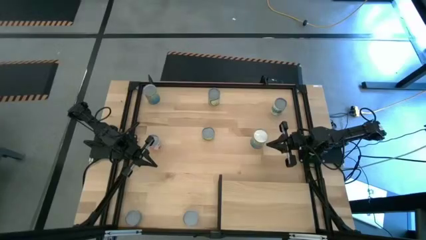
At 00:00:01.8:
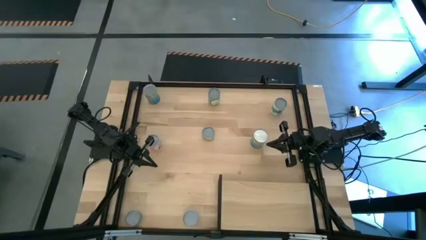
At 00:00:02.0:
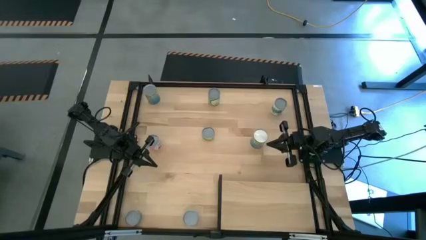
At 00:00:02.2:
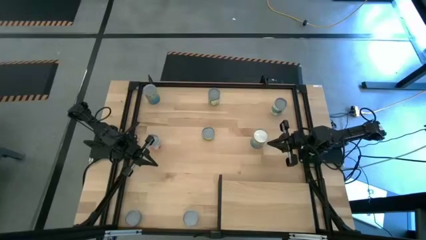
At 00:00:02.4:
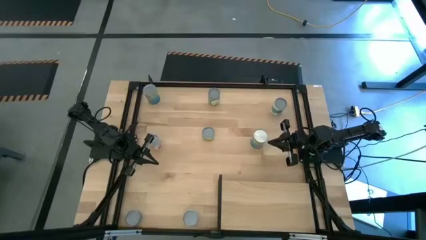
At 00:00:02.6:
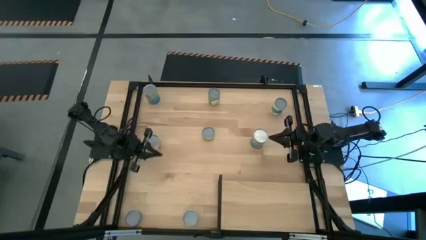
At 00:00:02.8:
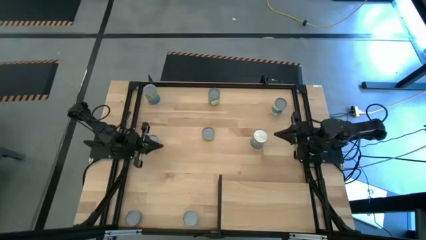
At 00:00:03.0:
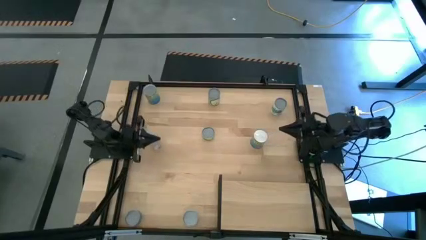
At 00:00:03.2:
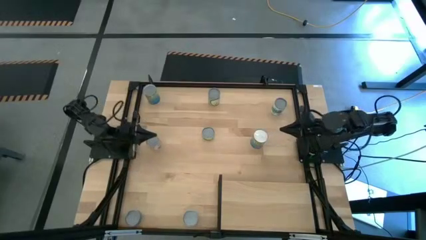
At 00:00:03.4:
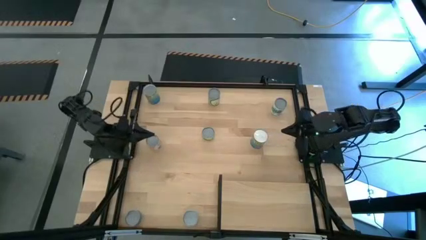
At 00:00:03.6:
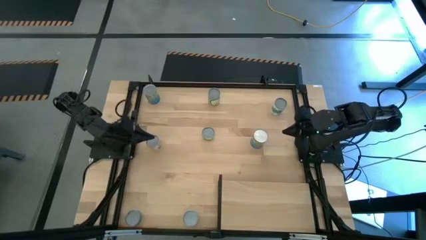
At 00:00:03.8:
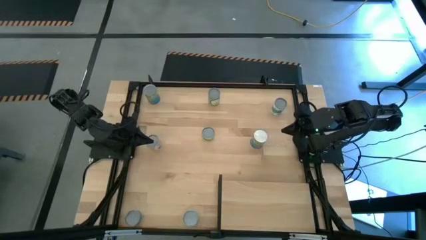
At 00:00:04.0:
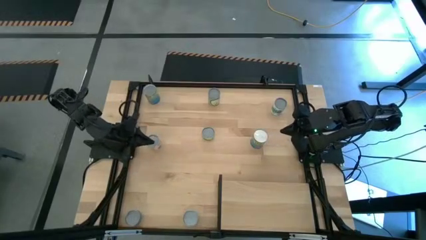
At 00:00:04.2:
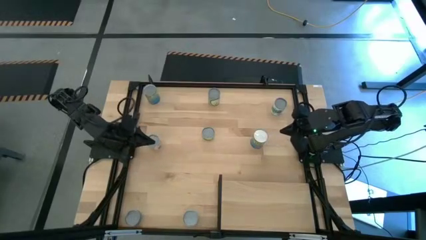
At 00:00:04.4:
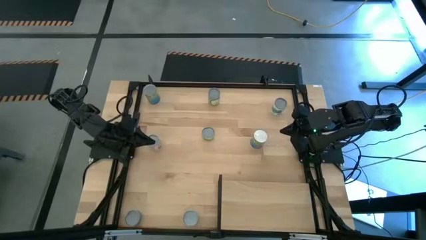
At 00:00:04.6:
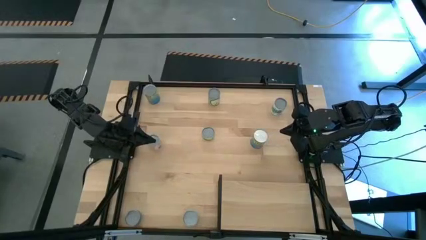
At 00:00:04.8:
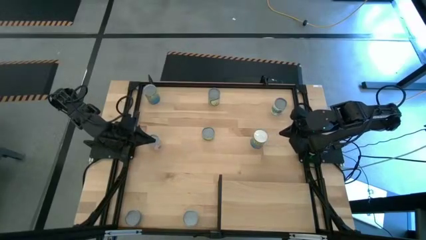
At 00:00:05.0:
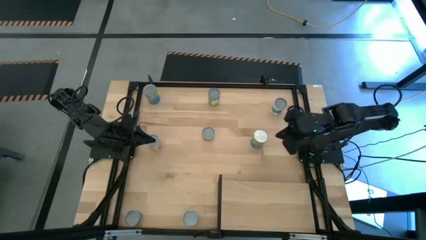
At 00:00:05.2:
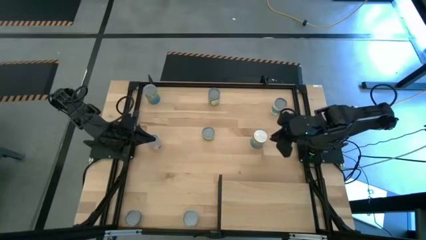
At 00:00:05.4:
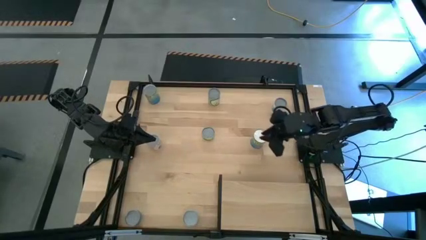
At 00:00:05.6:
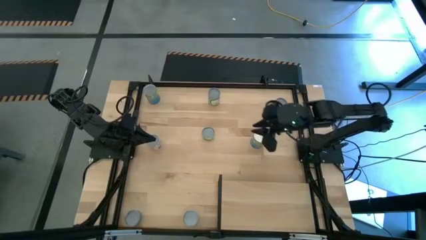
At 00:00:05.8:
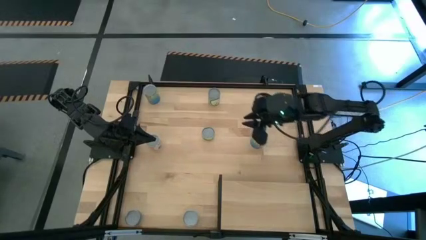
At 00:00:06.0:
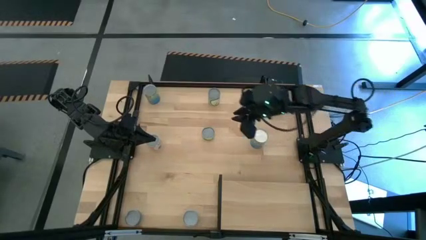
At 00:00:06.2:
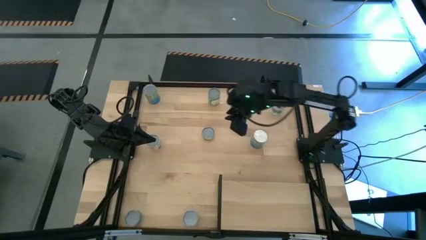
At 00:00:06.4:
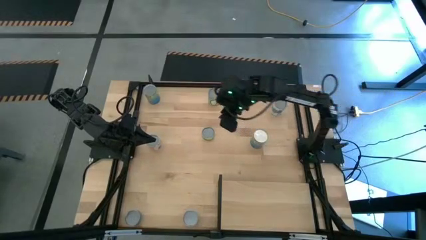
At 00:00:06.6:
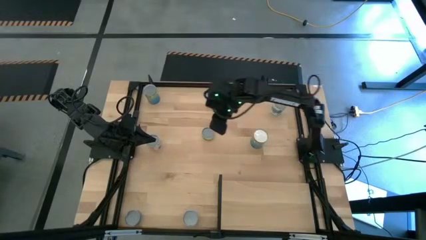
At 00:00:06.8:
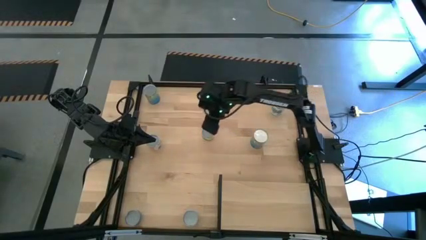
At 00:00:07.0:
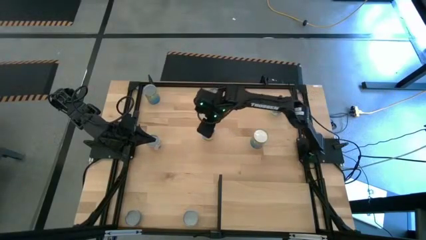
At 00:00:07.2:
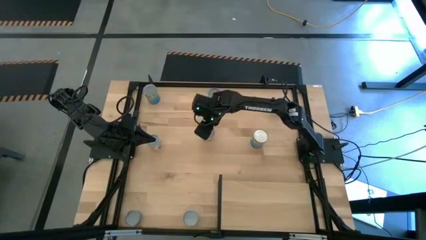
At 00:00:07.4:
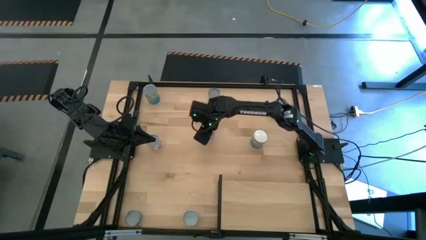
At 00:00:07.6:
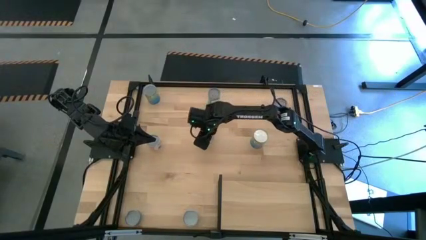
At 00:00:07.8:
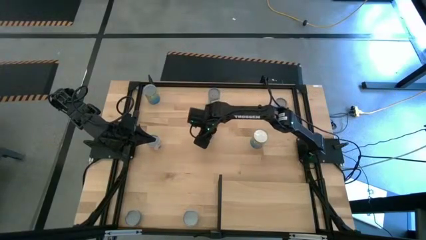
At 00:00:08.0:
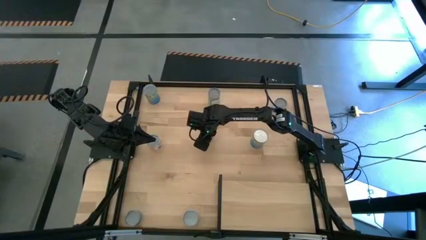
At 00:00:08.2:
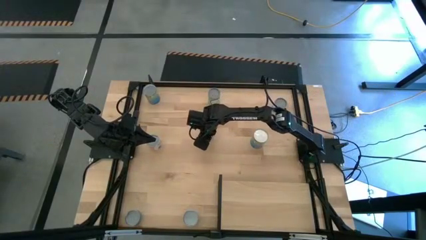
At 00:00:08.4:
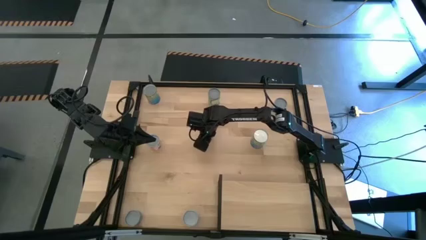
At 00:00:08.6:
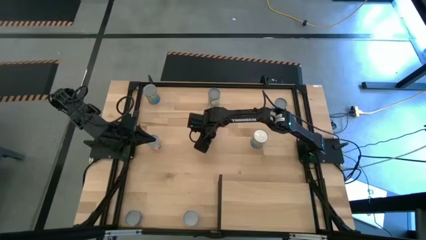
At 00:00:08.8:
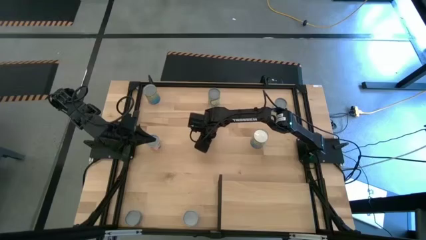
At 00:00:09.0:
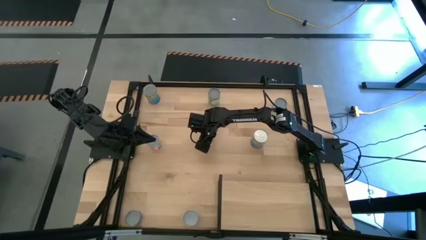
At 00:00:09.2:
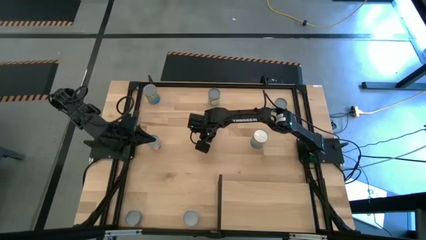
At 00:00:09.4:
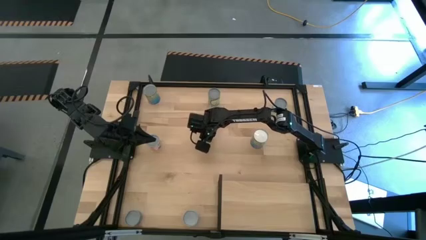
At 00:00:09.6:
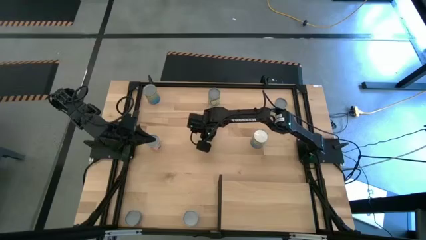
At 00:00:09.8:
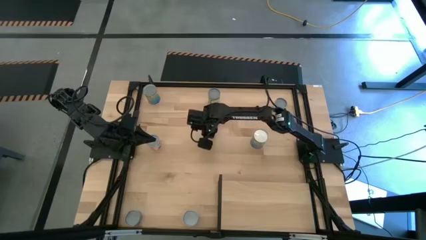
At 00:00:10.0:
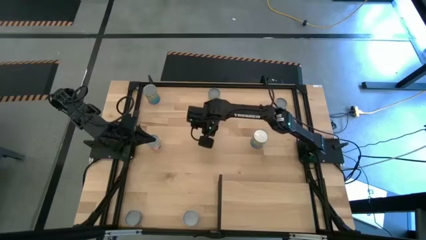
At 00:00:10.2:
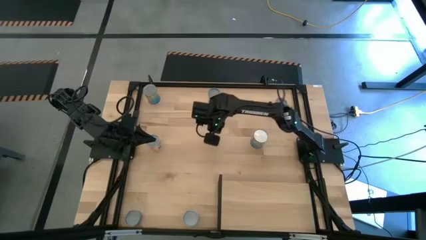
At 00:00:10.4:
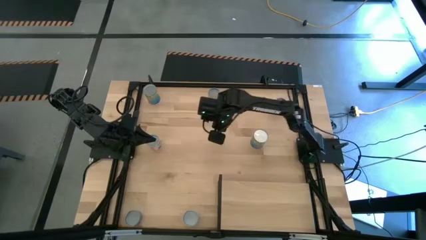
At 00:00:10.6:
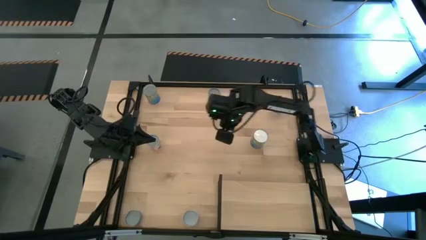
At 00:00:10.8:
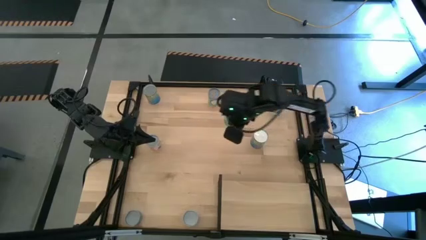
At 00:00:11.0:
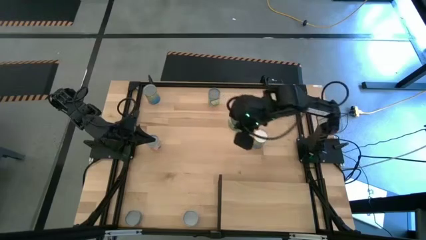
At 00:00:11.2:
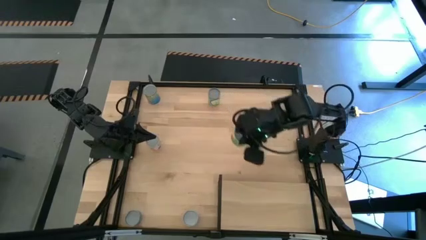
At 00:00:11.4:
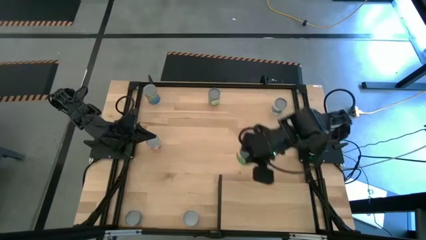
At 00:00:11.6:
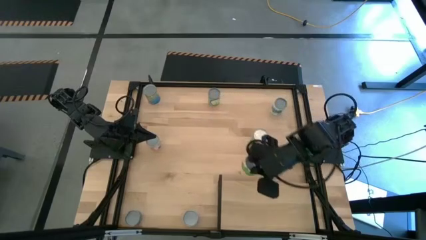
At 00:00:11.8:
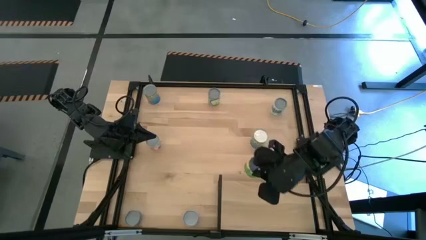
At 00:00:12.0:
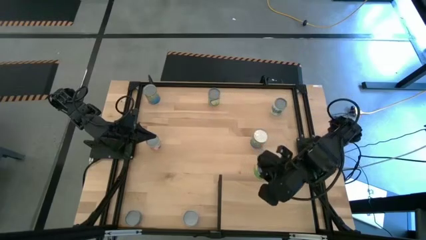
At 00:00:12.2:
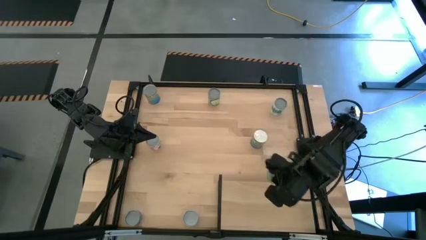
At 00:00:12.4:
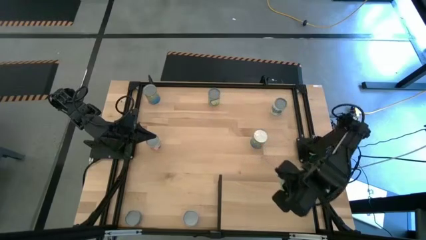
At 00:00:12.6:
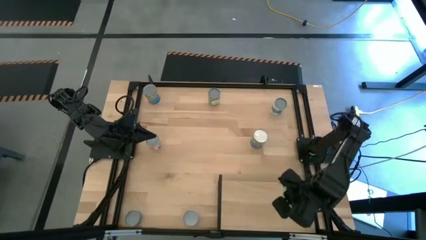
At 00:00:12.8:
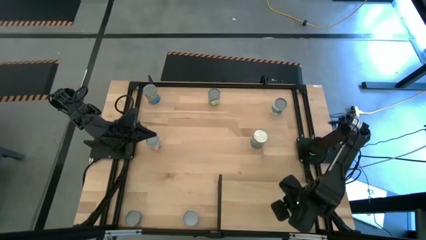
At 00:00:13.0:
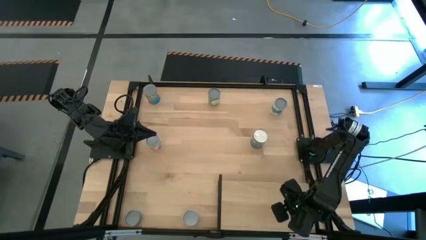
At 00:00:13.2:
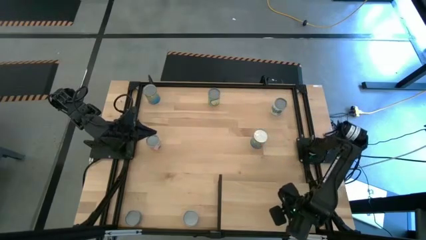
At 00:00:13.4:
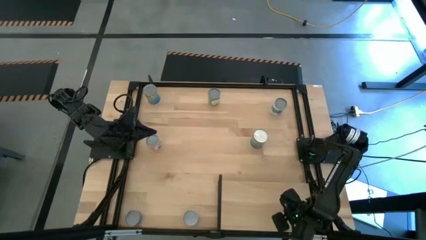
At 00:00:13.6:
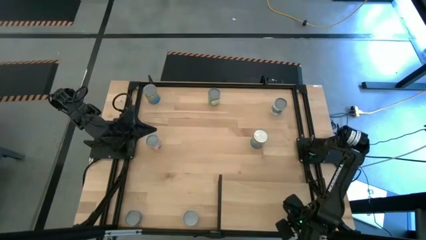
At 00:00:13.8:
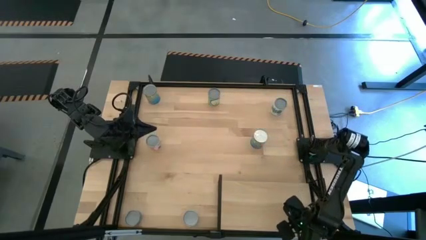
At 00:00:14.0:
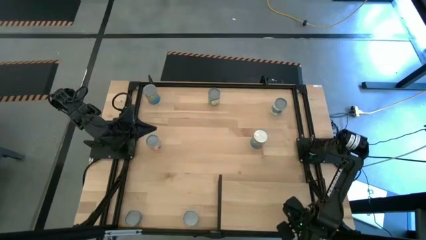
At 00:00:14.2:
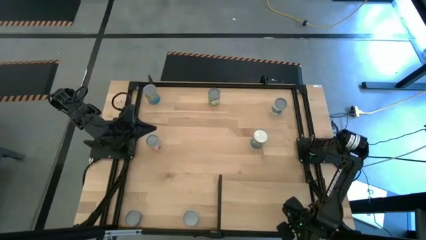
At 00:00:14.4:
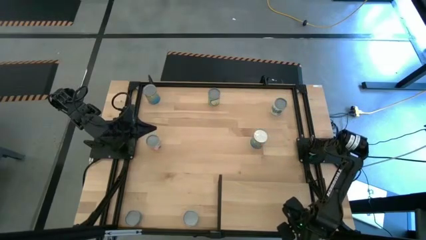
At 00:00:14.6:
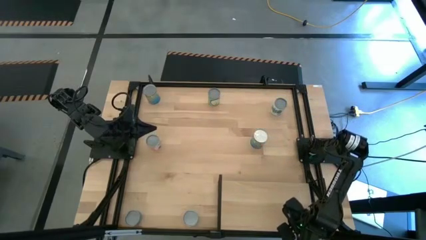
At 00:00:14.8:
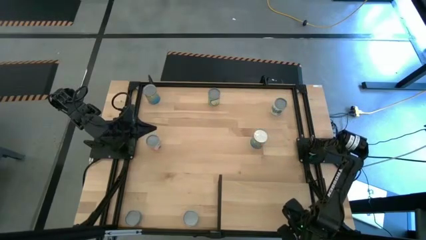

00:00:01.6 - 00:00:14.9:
Task: Pick and place cans onto a shelf
Put the canned meatballs on the shelf
